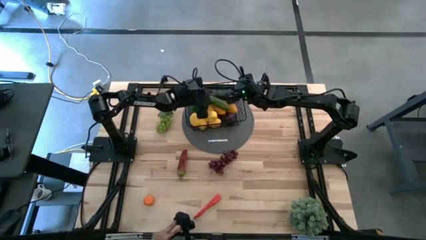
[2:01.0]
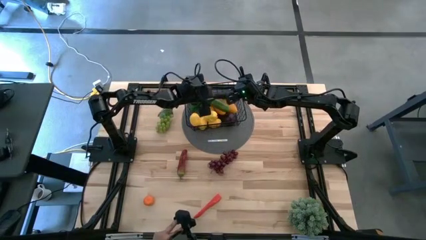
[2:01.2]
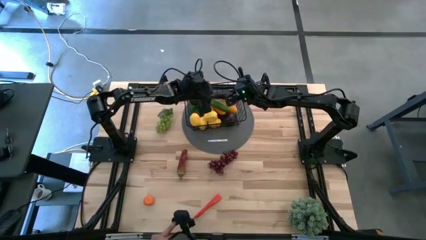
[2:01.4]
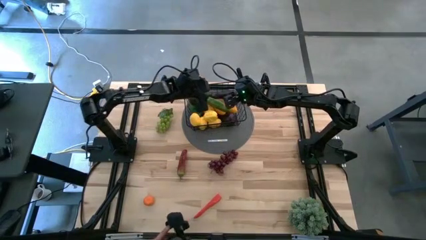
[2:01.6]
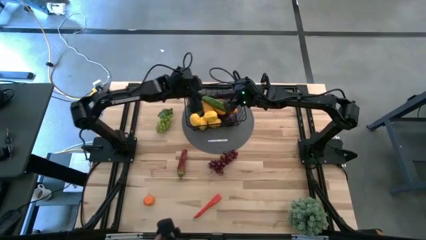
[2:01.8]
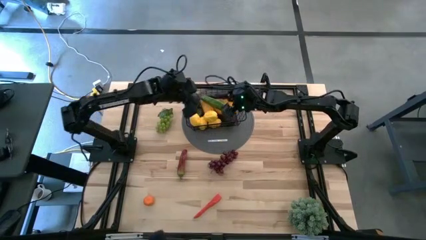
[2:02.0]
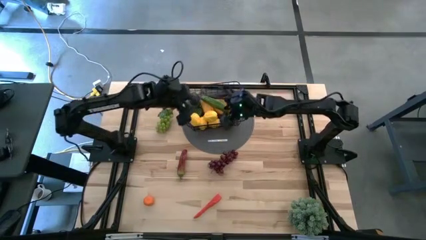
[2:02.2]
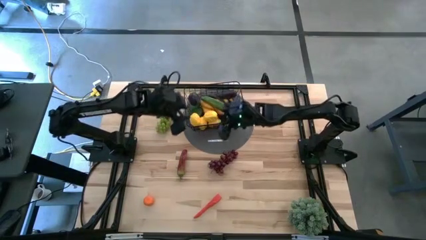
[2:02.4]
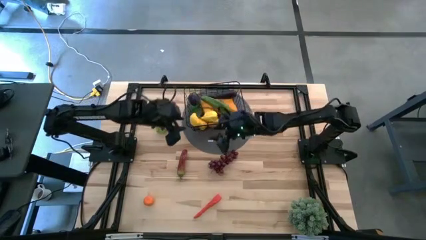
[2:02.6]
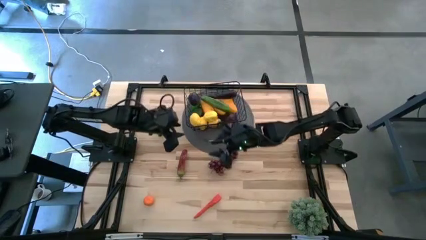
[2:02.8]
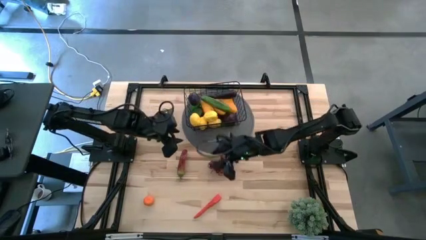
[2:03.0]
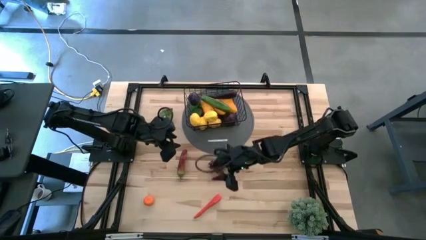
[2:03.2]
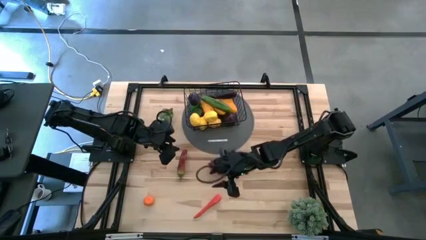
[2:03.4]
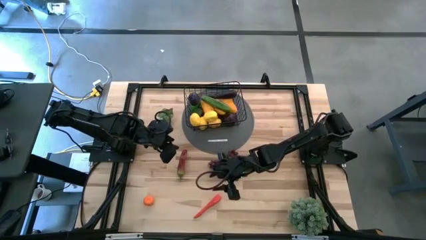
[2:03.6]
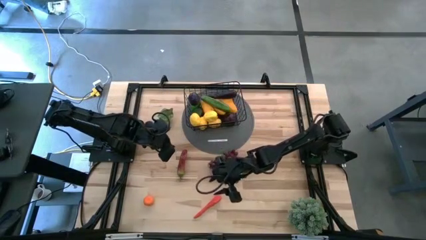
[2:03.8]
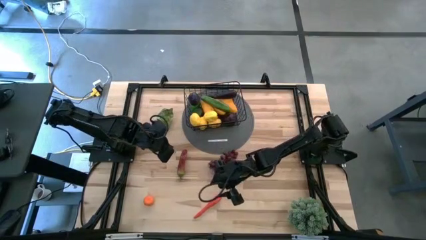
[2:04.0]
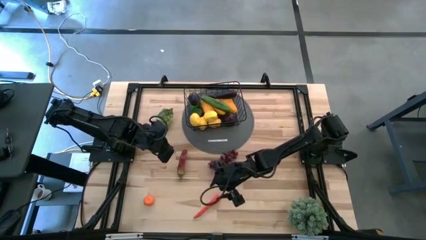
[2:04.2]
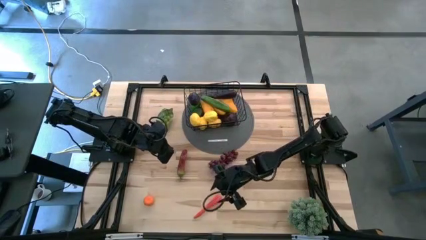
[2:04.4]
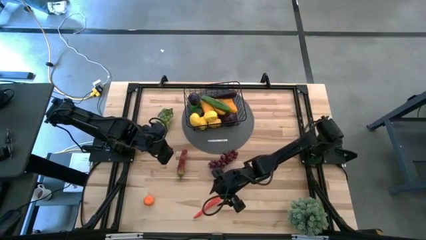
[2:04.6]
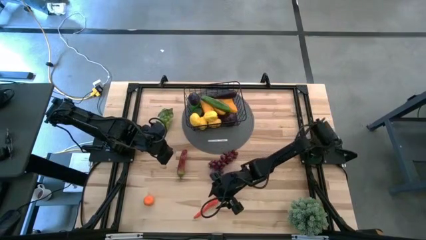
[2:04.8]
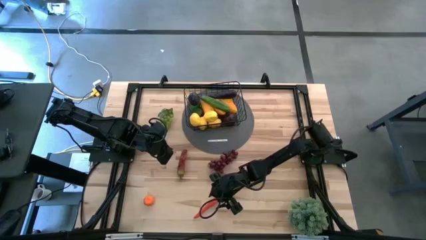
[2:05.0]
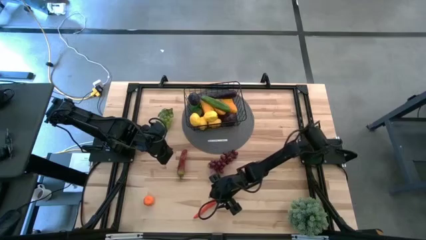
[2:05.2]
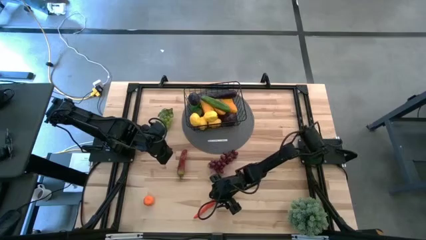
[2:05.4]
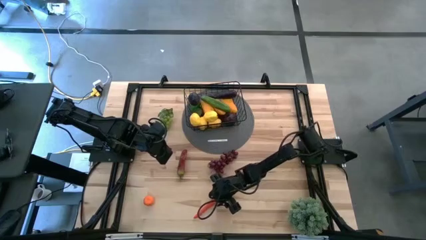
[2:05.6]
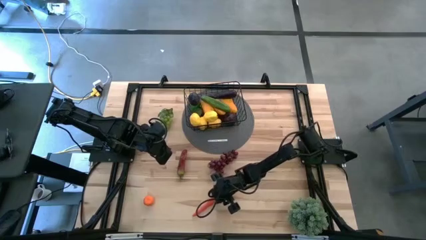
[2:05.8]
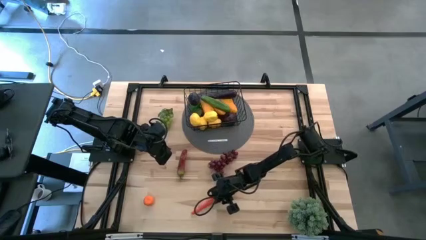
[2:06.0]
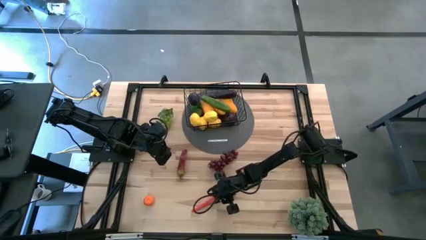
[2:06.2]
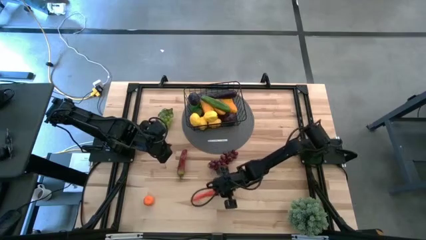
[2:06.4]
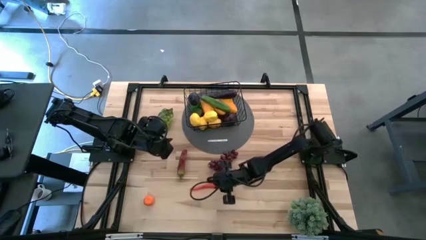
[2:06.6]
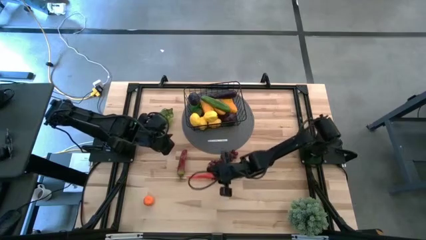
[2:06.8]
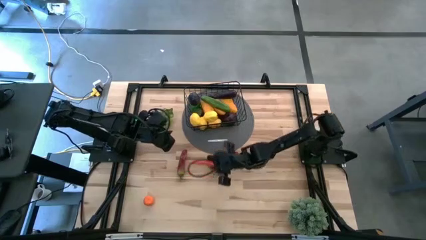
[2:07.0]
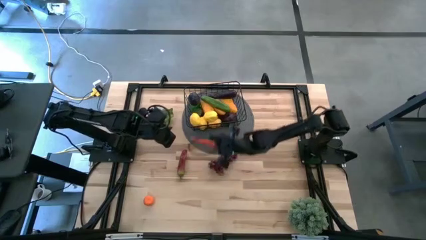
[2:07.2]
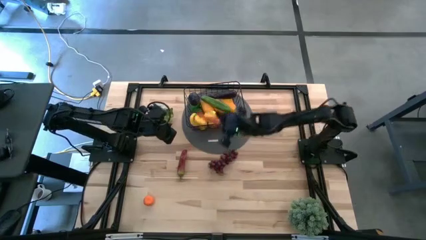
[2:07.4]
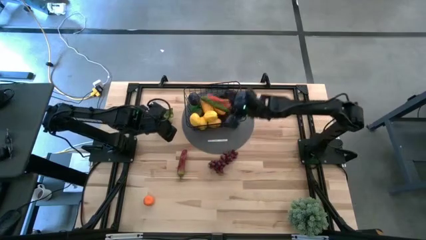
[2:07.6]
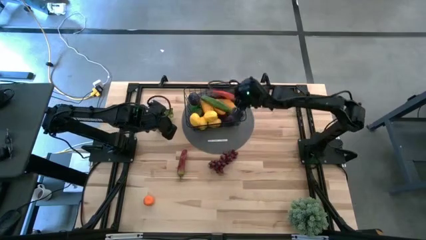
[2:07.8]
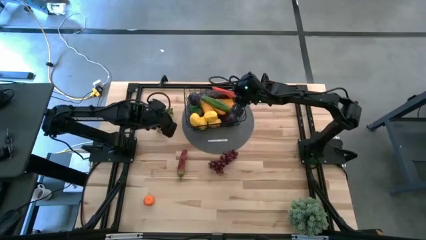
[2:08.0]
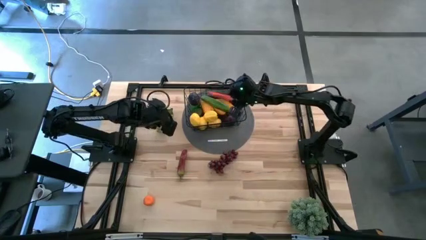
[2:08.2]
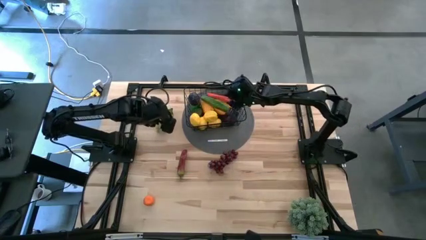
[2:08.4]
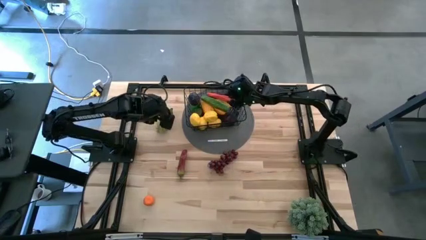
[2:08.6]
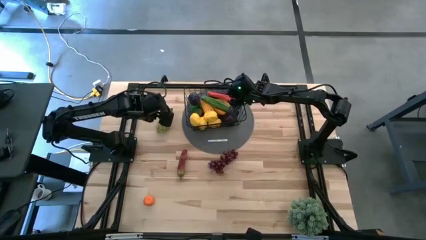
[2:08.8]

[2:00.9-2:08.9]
Task: Build produce basket
Put the carrot into the wire basket

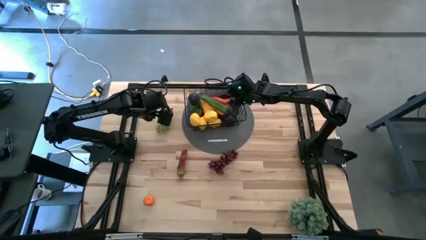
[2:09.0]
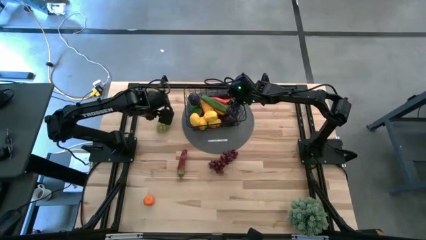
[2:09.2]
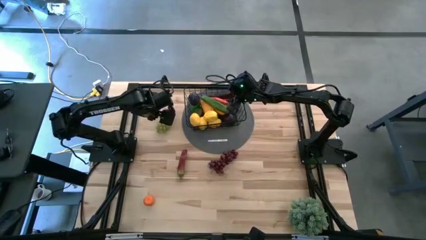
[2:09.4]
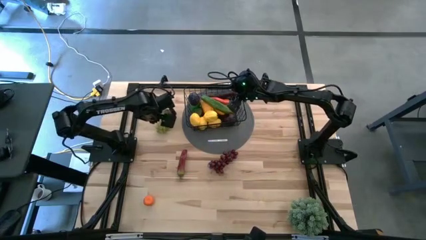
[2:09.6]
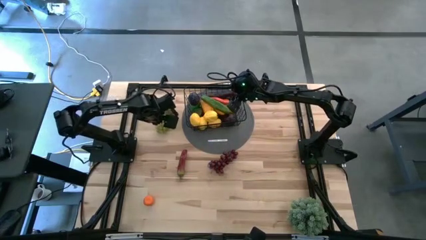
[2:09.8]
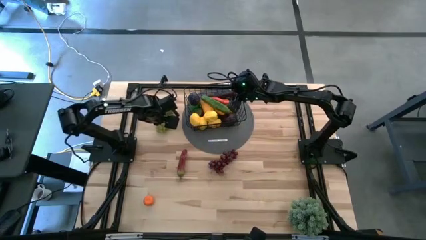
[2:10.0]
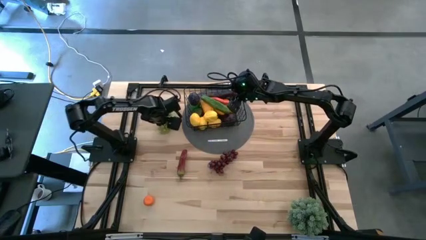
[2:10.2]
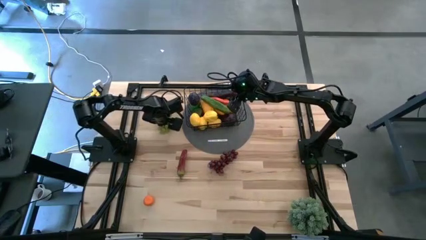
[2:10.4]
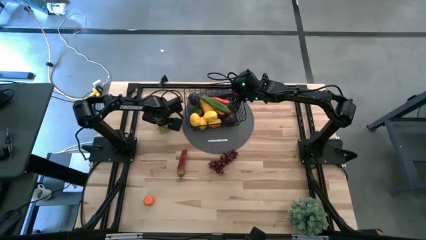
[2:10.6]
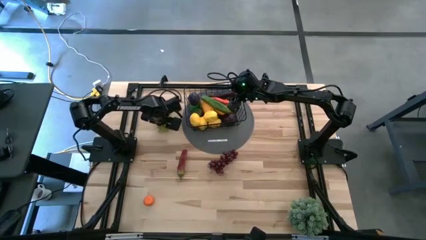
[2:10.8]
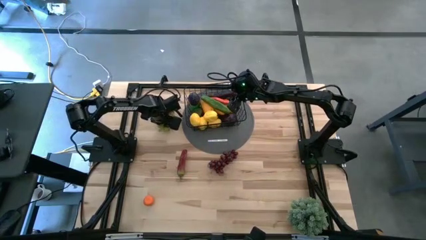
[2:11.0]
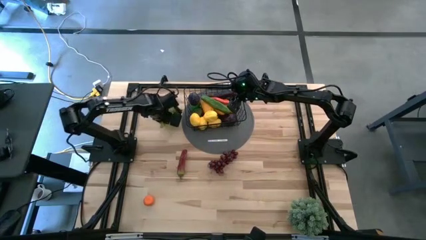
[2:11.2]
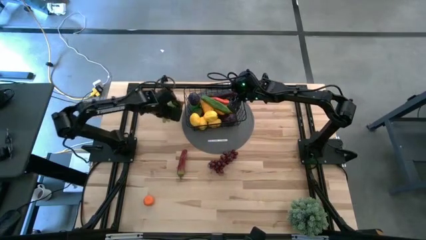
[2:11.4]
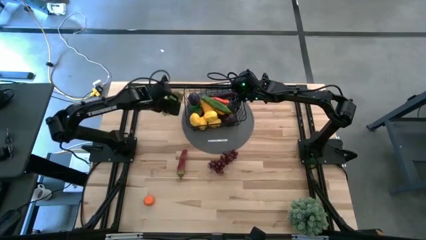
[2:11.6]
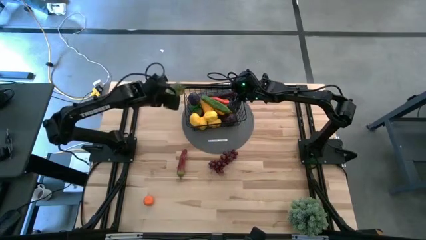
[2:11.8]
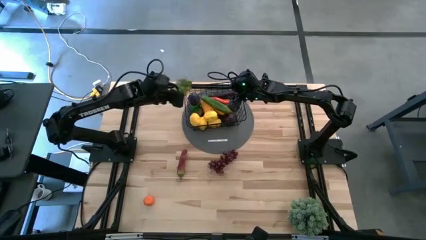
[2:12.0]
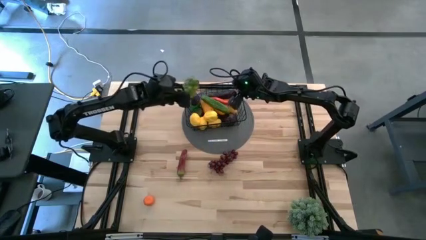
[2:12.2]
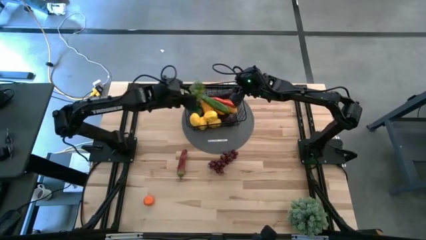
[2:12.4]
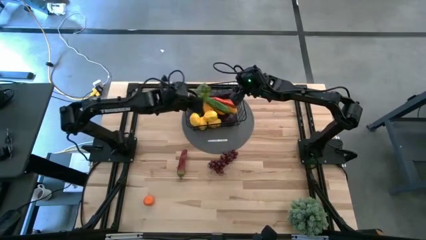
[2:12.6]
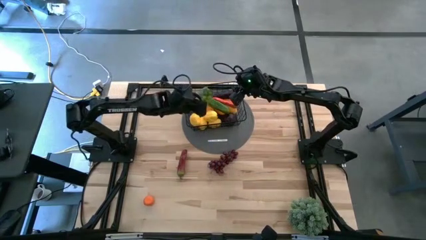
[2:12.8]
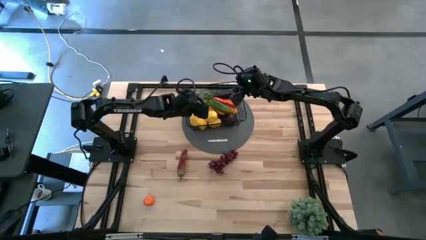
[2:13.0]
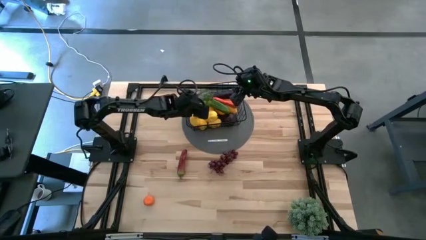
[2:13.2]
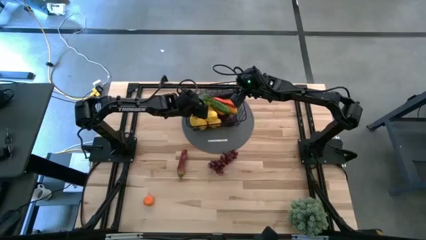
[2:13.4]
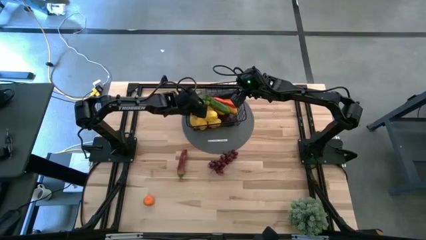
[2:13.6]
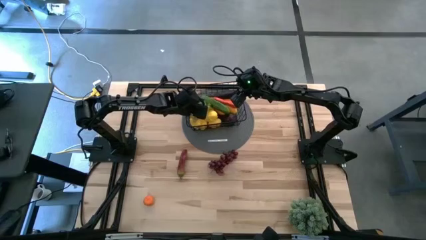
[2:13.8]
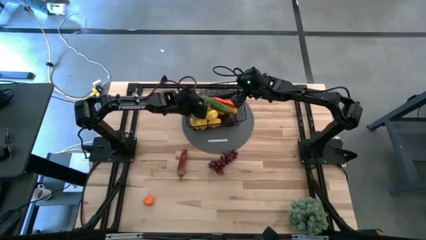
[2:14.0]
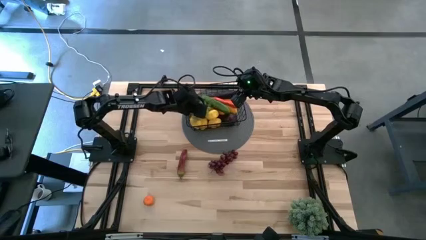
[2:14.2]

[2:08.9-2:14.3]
Put the green grapes into the wire basket
